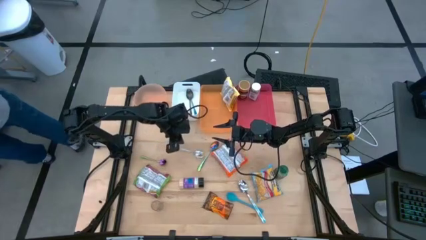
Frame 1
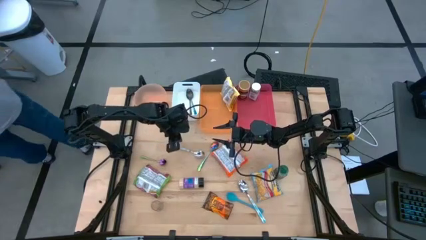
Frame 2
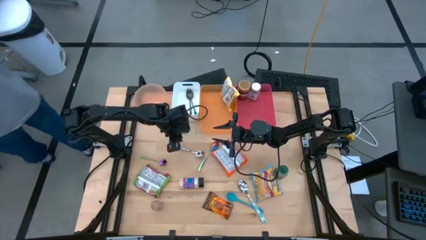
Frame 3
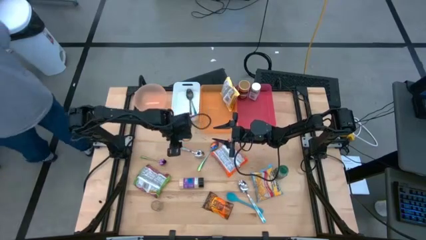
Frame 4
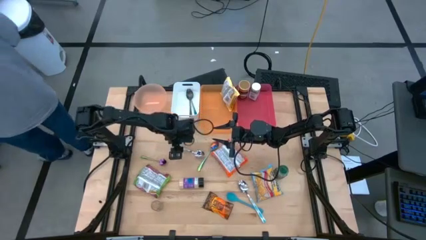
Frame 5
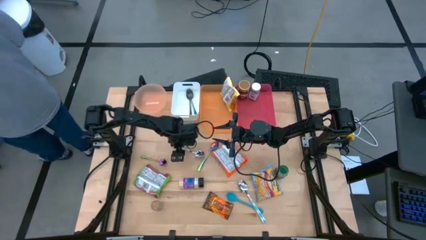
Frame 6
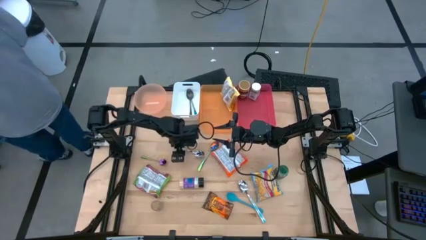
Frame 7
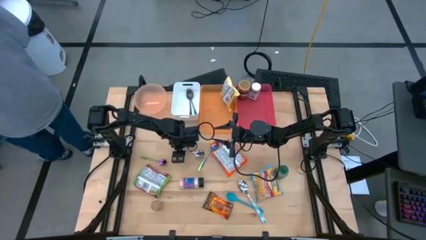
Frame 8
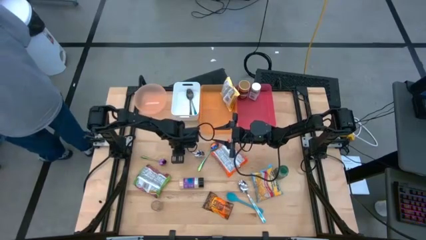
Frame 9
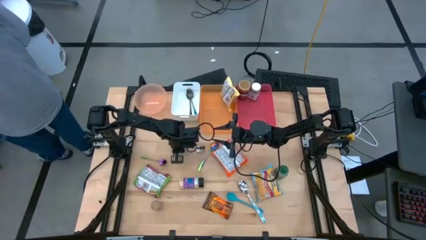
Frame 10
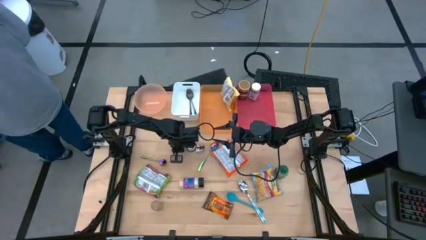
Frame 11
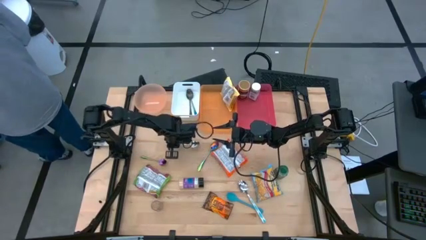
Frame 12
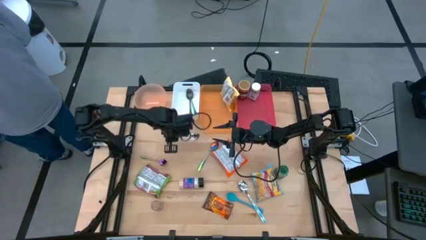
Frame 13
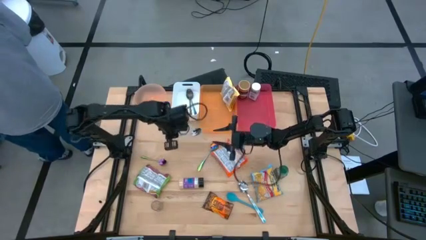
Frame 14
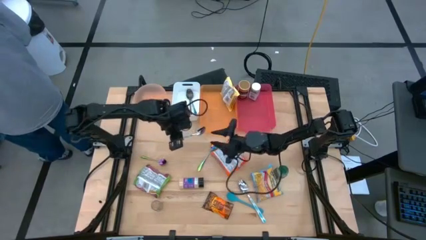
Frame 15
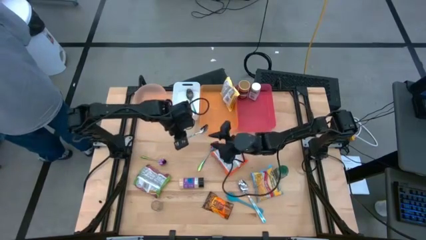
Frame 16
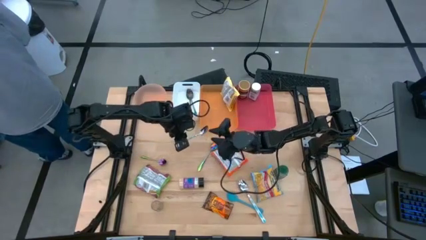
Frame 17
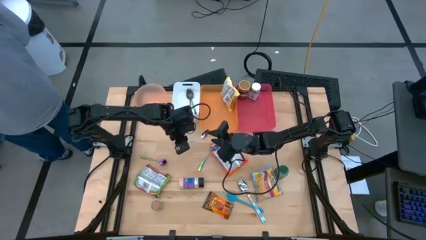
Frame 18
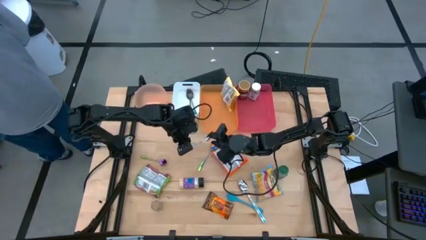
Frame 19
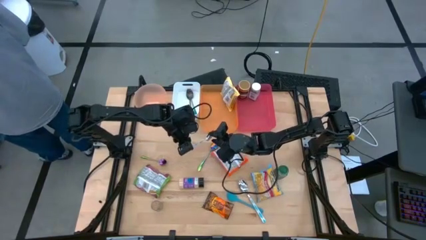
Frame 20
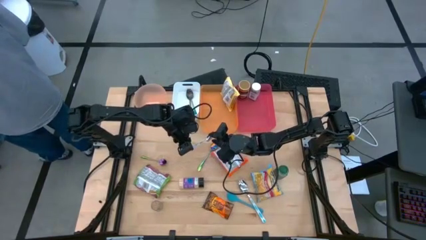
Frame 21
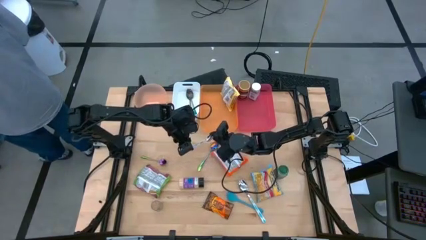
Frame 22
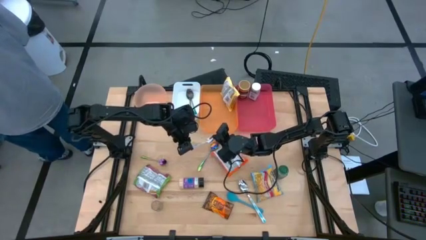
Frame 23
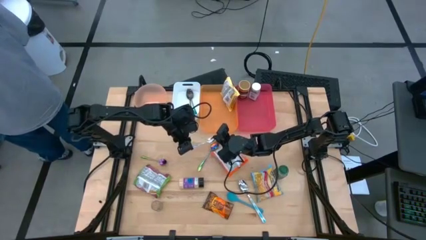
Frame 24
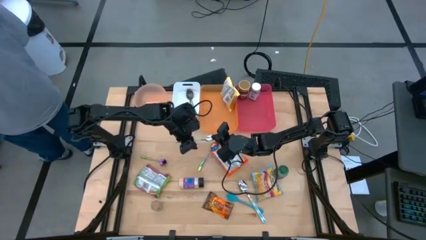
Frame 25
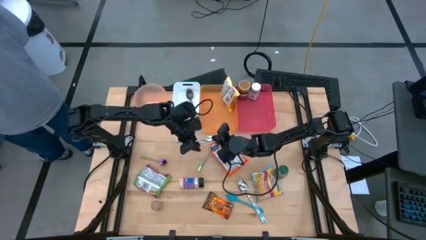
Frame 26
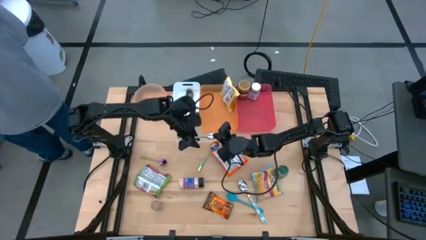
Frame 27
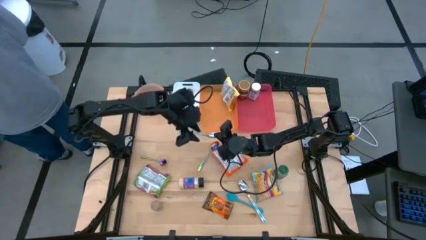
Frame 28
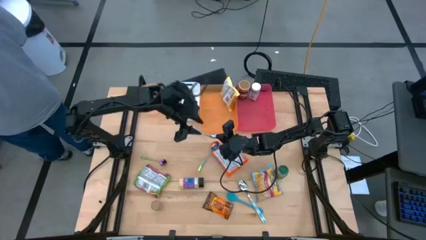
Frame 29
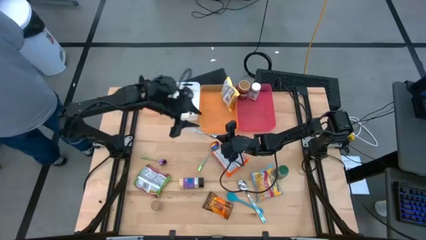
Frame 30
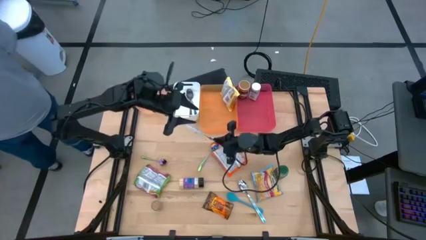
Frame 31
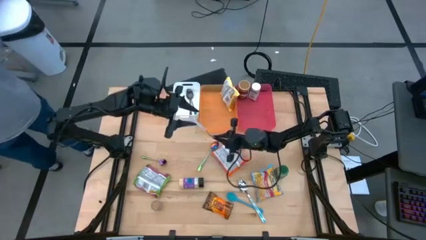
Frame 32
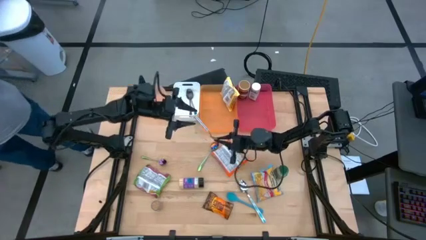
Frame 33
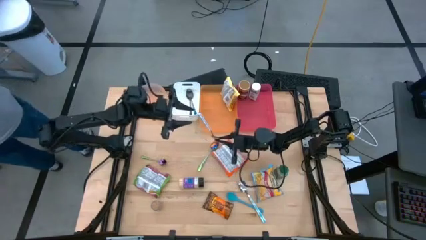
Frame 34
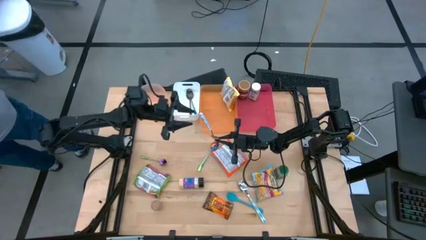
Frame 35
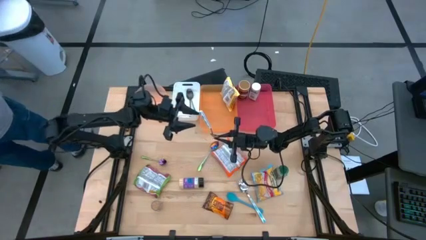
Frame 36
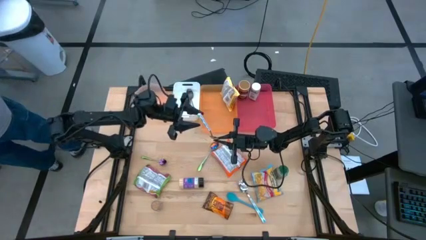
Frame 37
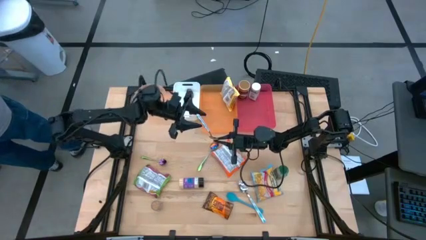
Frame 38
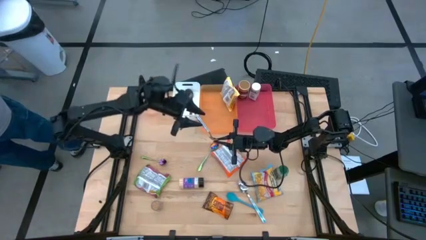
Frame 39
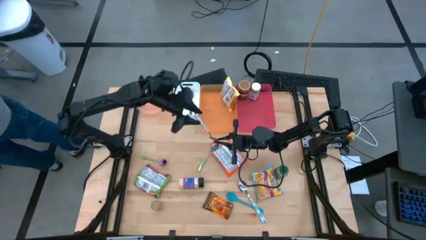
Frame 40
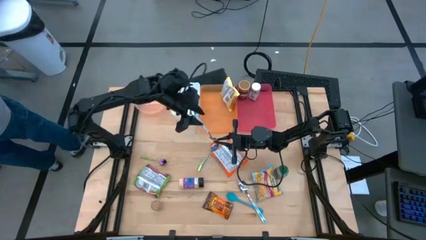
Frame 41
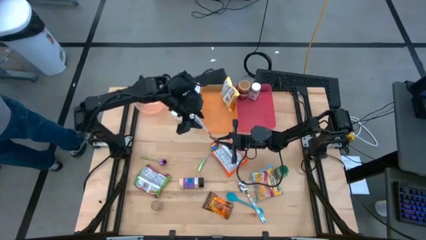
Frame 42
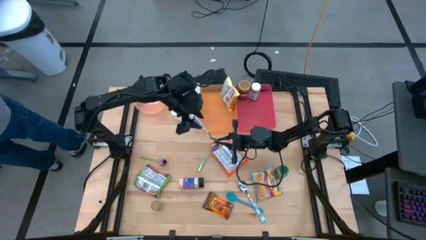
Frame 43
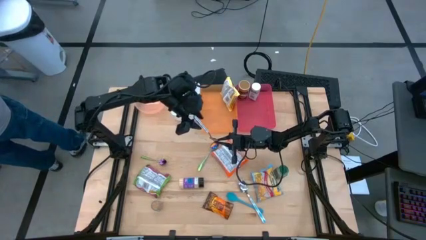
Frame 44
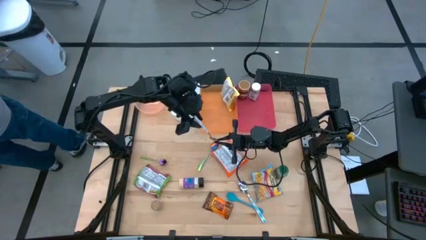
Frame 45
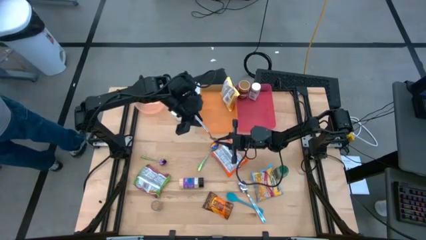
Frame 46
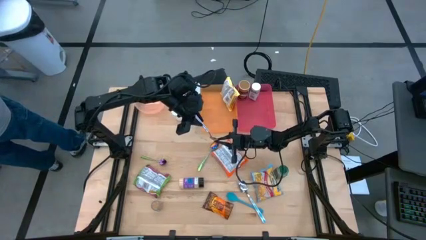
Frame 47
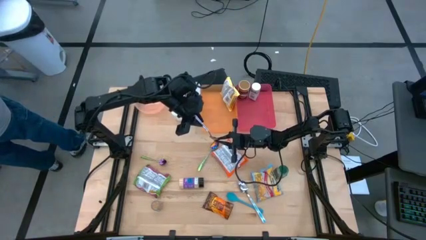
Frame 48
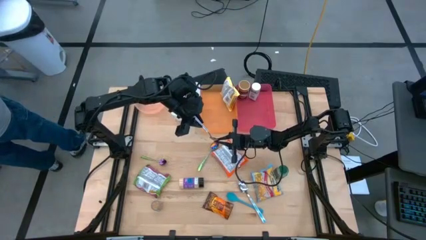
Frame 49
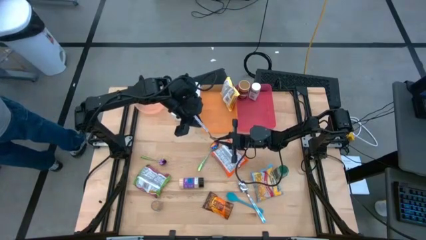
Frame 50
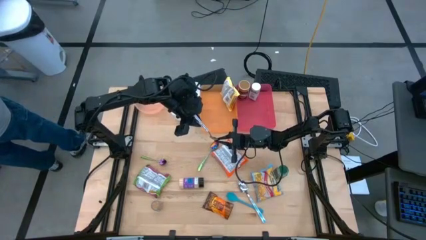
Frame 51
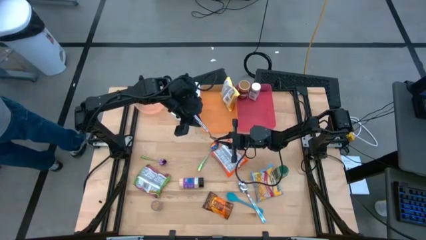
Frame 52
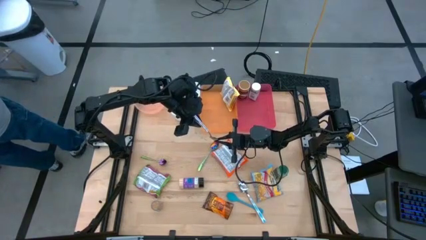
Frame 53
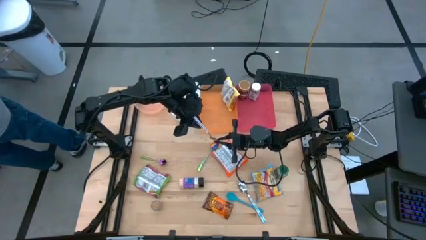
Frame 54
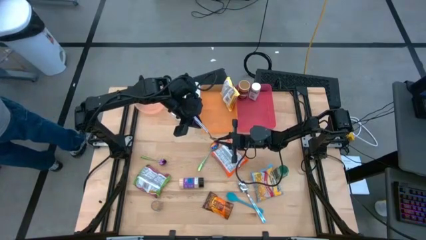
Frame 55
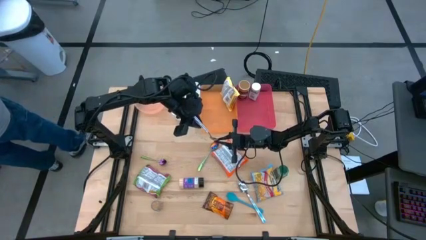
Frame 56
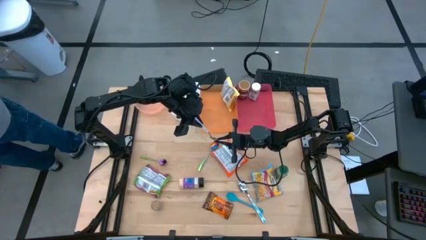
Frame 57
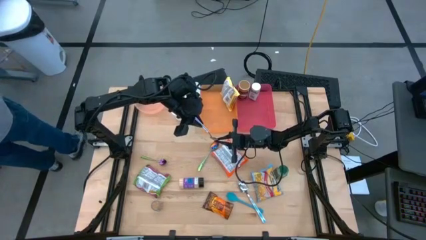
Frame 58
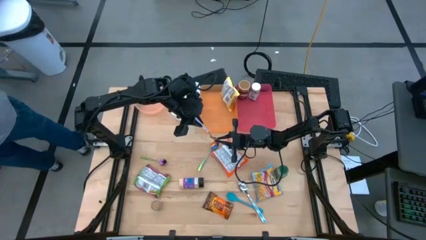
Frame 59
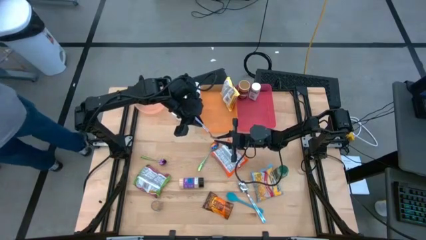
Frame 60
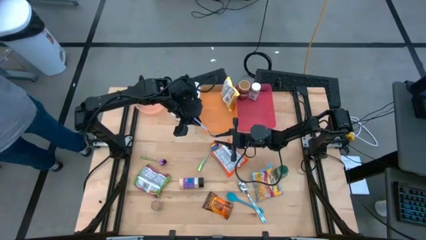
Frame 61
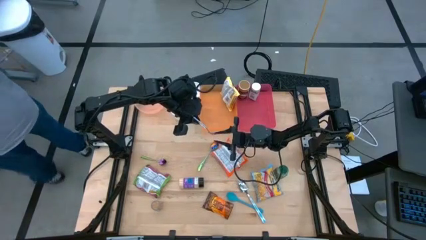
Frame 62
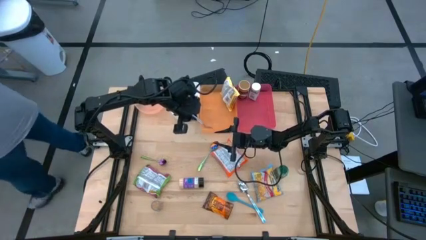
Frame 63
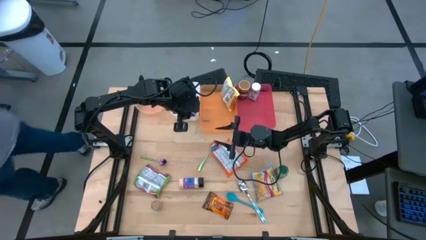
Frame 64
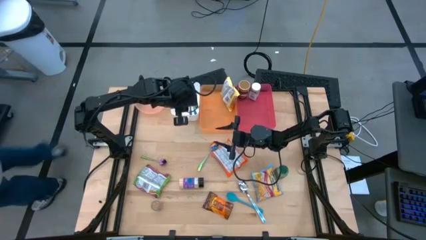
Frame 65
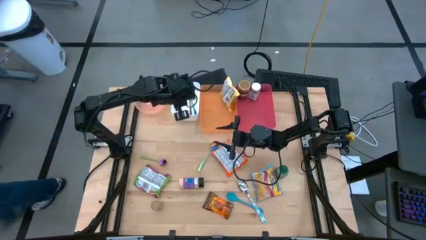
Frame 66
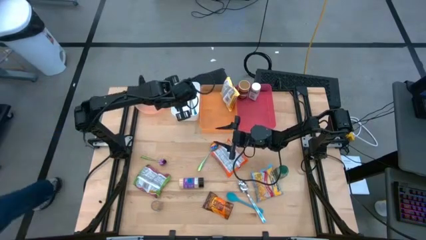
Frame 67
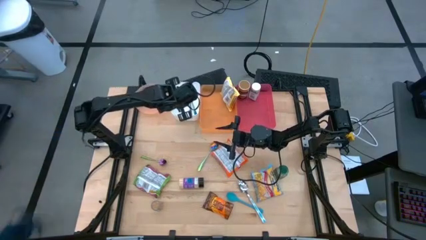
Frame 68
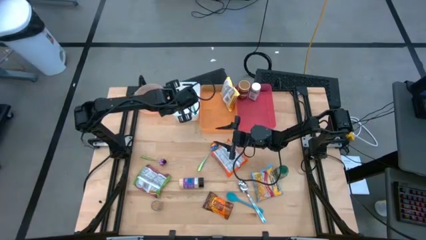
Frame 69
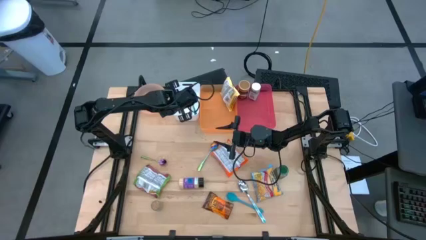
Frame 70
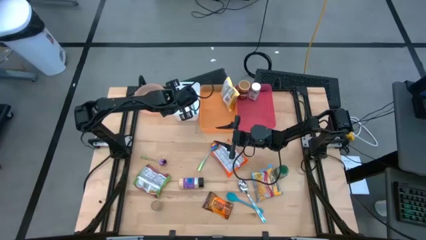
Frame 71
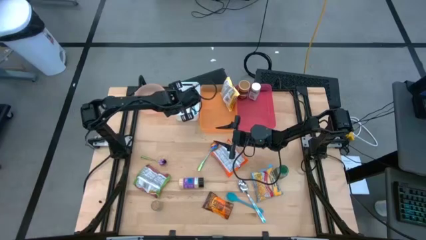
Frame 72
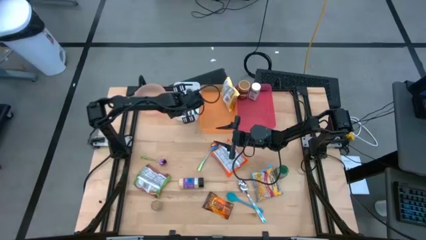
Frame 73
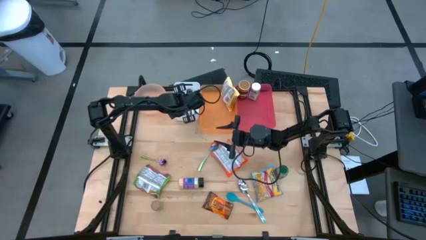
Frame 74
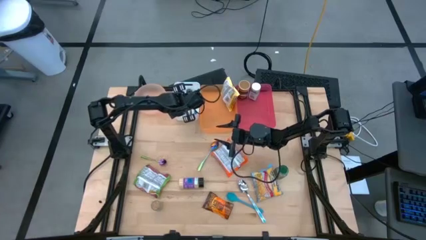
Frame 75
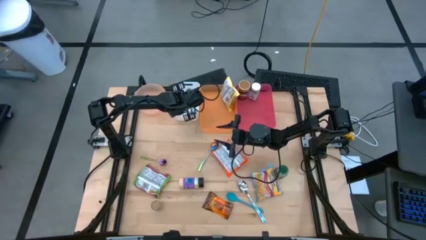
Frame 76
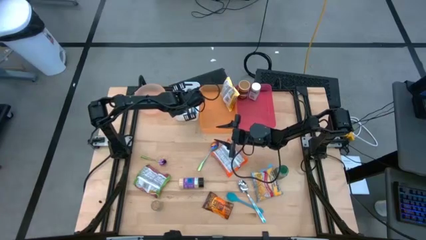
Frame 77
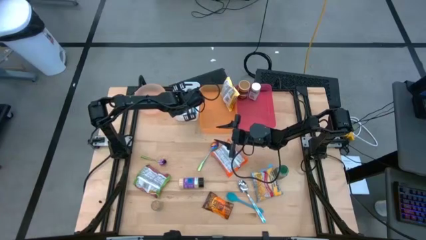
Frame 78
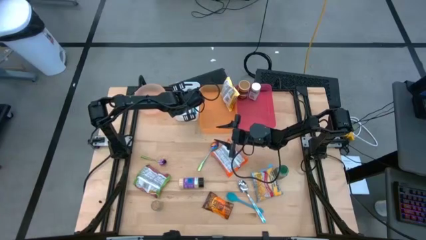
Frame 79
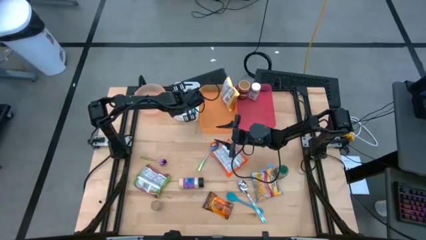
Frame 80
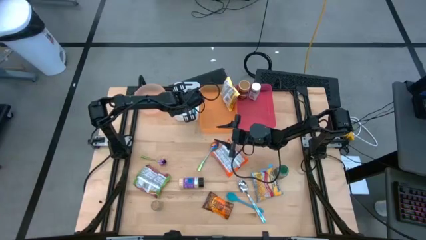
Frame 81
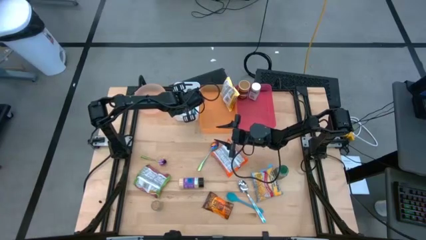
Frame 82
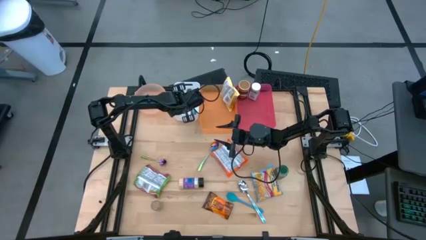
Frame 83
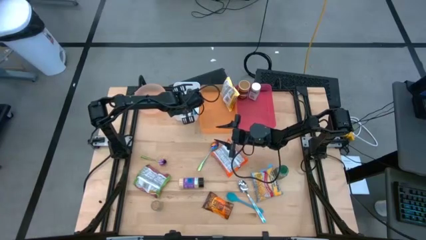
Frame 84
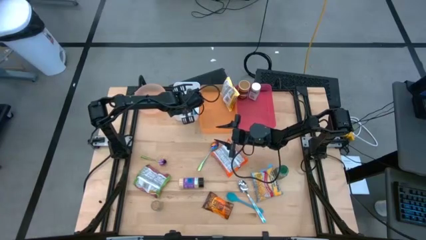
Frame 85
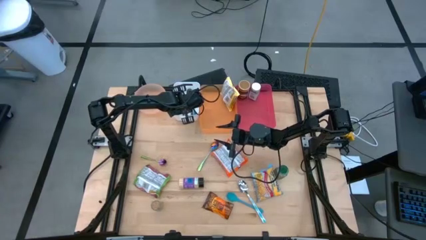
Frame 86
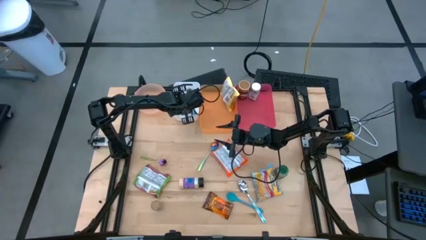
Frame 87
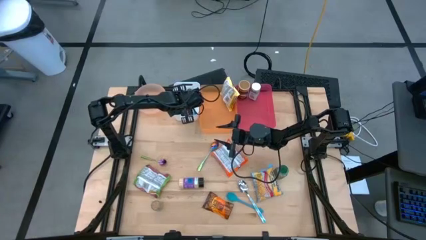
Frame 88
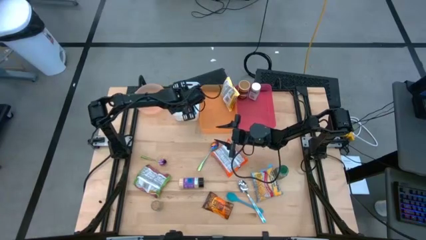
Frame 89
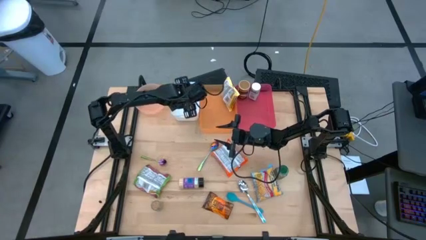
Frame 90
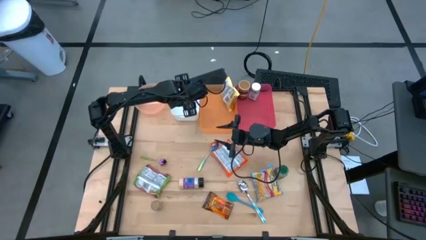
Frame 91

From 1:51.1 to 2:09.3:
Task: Pick & Place Food Item
Put the top blue patterned spoon into the white bin
